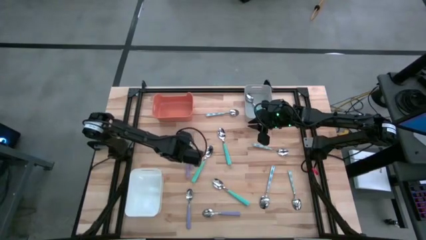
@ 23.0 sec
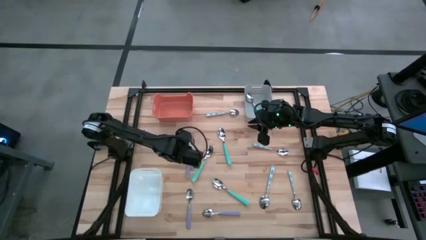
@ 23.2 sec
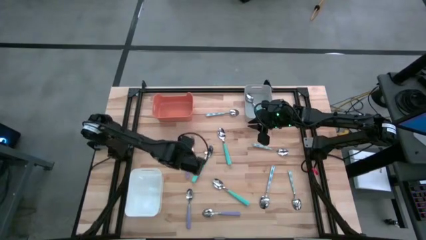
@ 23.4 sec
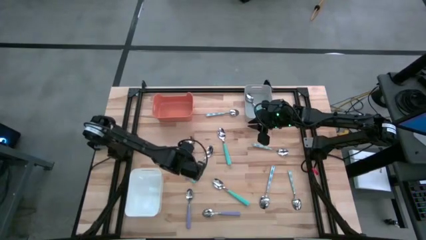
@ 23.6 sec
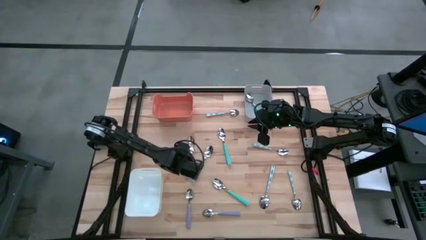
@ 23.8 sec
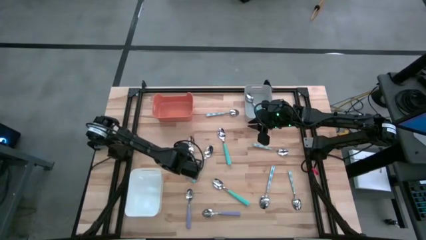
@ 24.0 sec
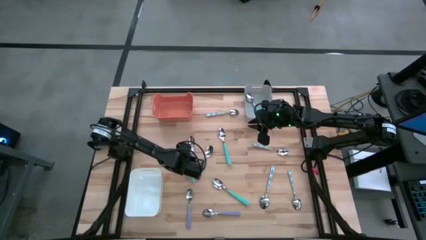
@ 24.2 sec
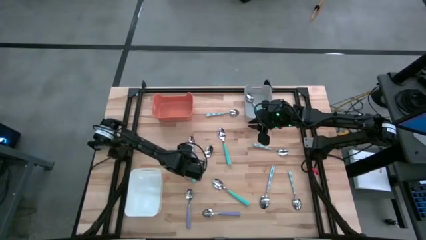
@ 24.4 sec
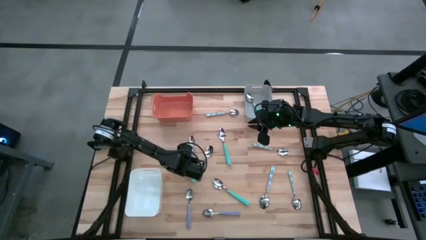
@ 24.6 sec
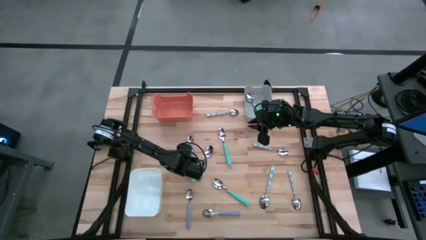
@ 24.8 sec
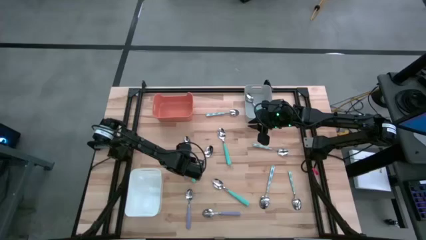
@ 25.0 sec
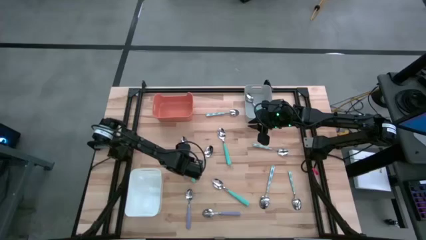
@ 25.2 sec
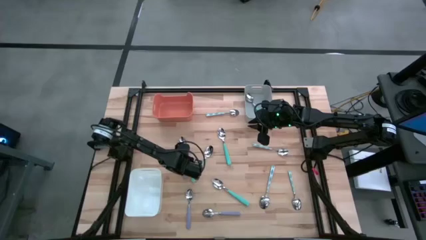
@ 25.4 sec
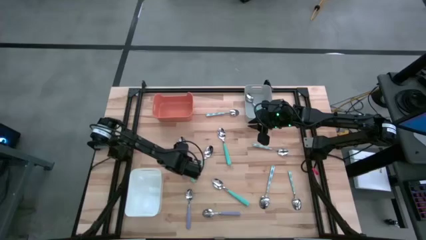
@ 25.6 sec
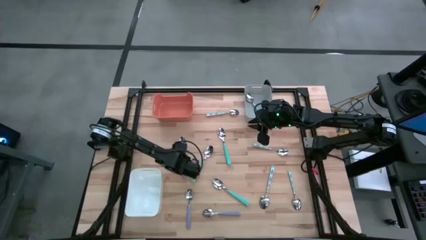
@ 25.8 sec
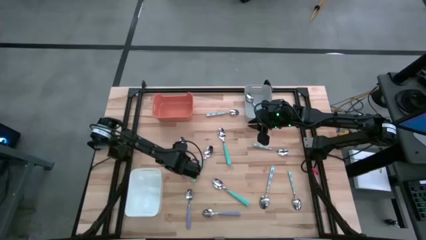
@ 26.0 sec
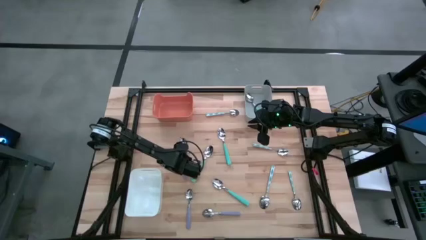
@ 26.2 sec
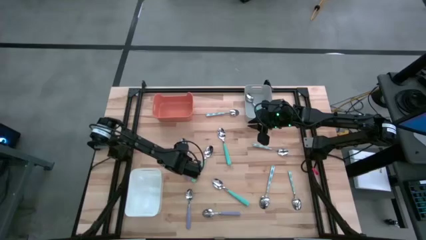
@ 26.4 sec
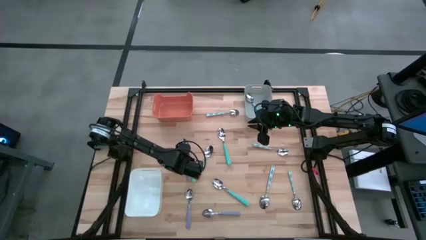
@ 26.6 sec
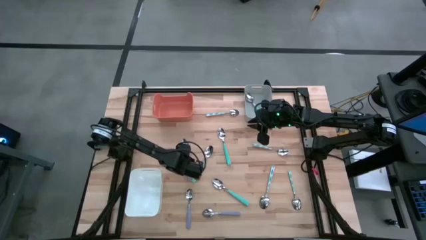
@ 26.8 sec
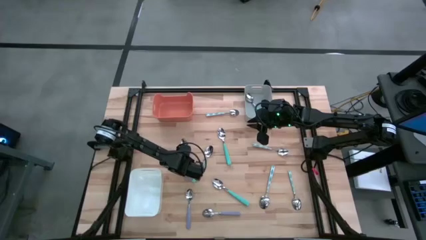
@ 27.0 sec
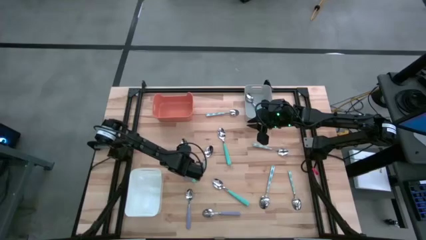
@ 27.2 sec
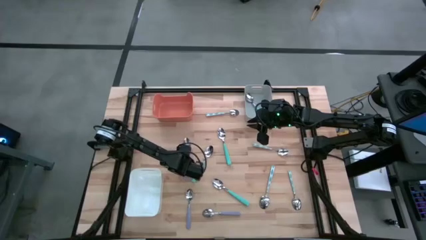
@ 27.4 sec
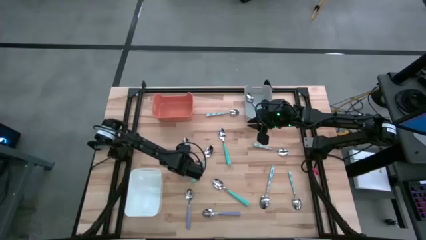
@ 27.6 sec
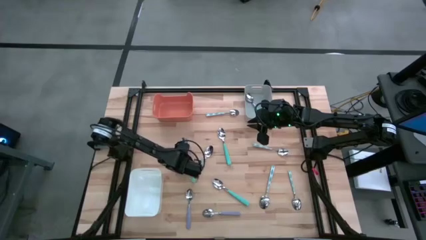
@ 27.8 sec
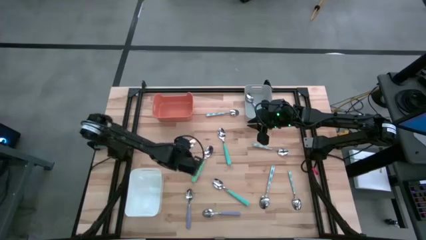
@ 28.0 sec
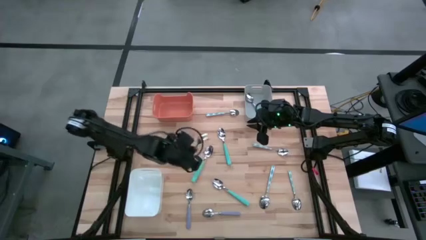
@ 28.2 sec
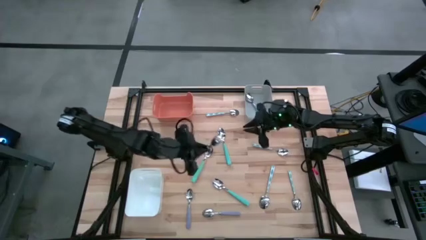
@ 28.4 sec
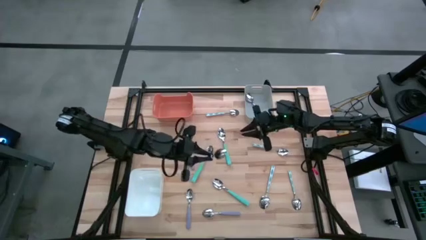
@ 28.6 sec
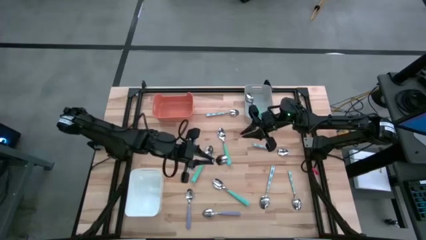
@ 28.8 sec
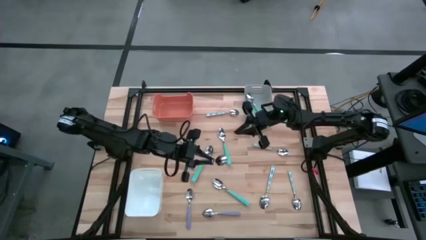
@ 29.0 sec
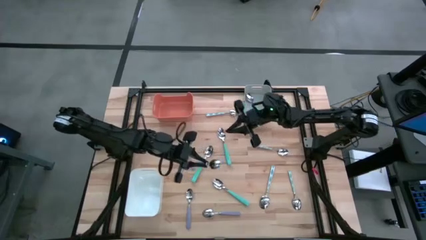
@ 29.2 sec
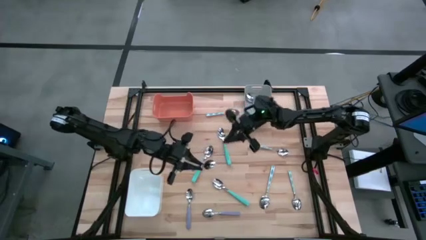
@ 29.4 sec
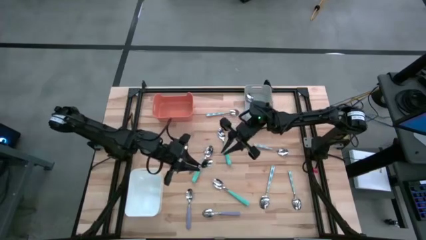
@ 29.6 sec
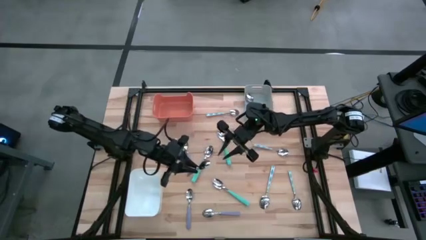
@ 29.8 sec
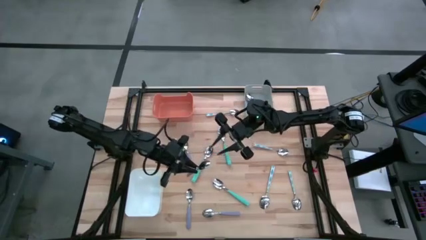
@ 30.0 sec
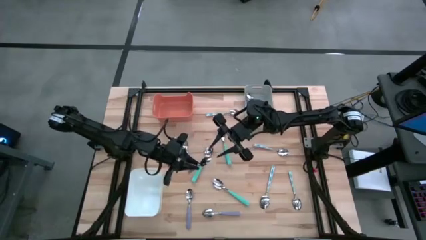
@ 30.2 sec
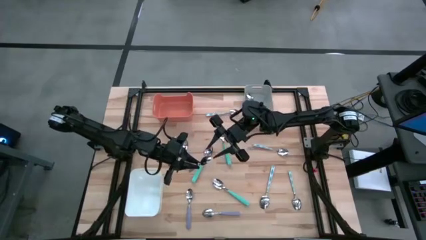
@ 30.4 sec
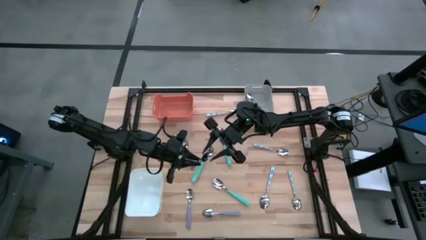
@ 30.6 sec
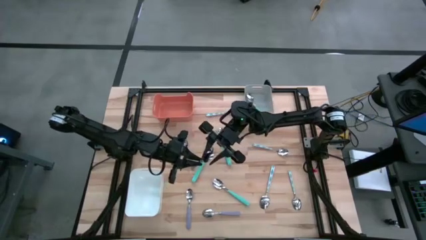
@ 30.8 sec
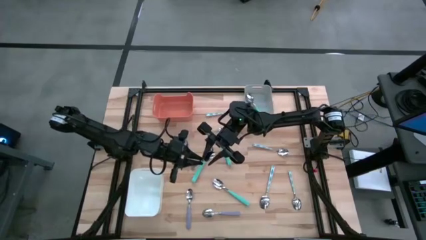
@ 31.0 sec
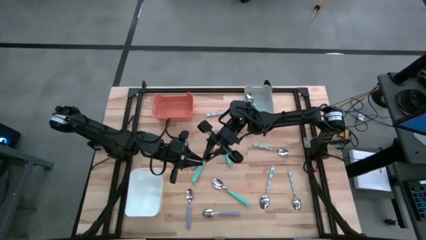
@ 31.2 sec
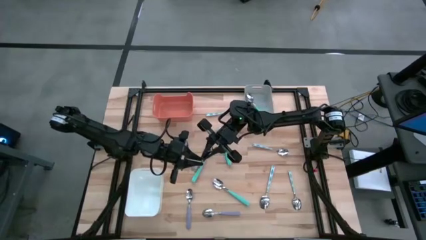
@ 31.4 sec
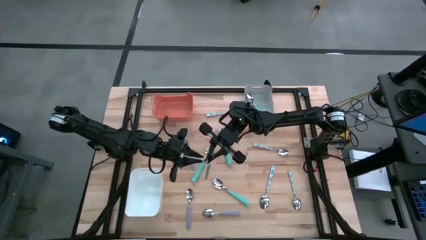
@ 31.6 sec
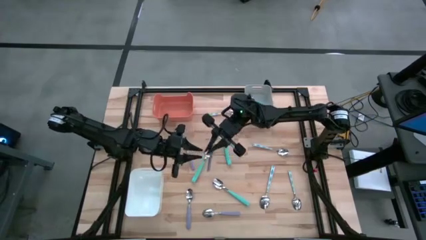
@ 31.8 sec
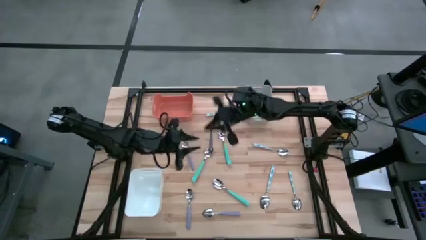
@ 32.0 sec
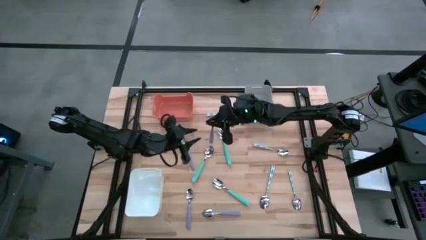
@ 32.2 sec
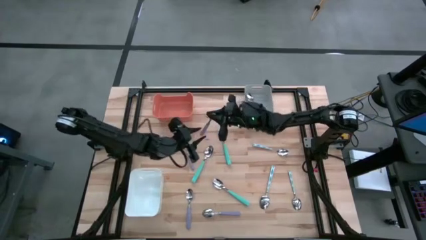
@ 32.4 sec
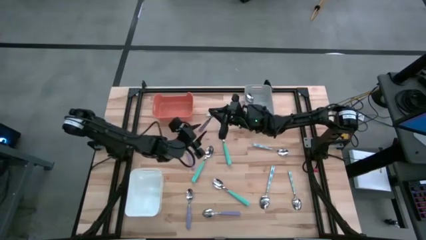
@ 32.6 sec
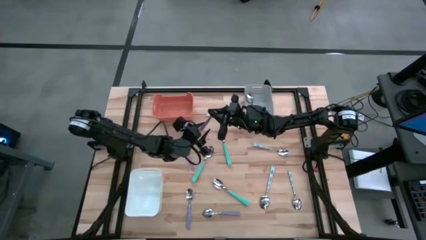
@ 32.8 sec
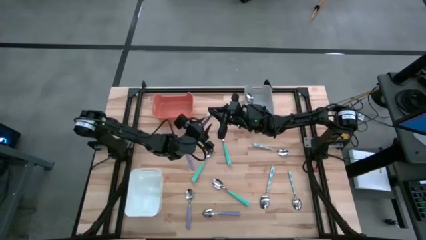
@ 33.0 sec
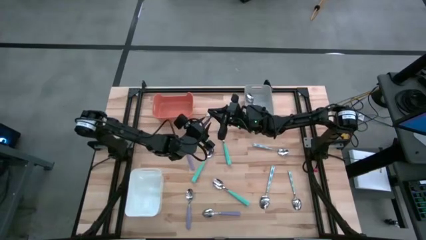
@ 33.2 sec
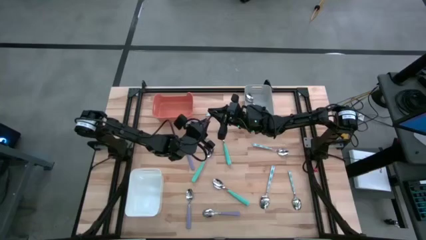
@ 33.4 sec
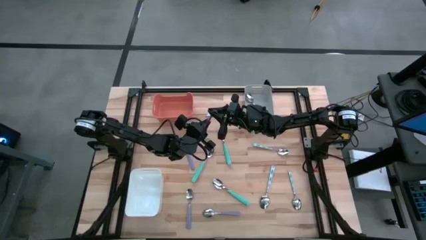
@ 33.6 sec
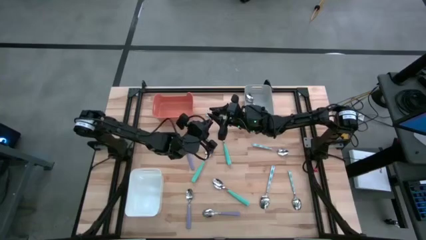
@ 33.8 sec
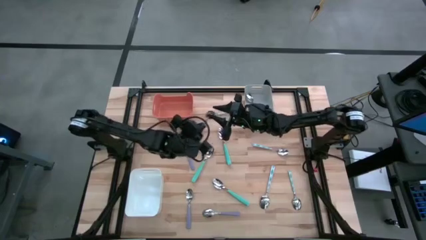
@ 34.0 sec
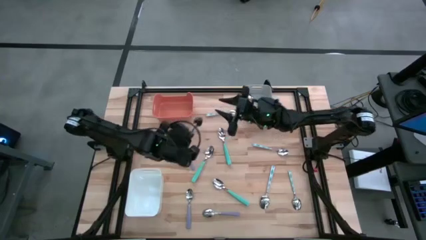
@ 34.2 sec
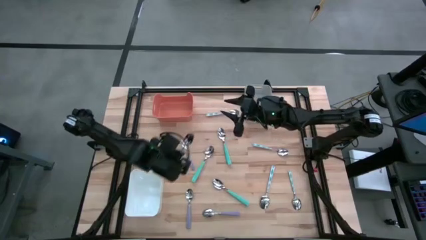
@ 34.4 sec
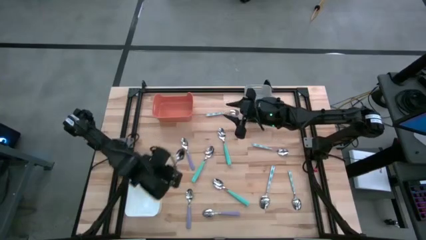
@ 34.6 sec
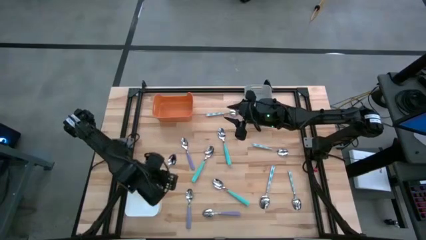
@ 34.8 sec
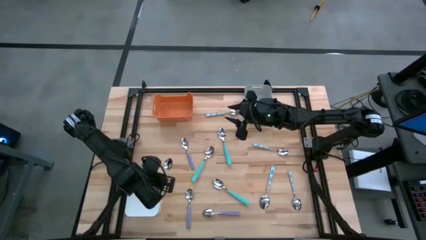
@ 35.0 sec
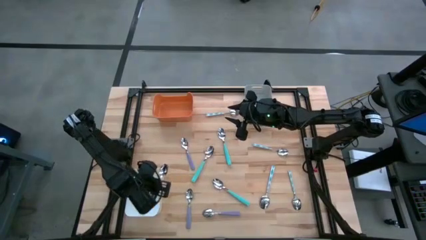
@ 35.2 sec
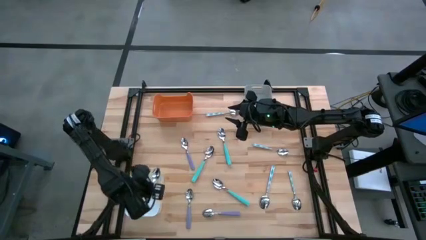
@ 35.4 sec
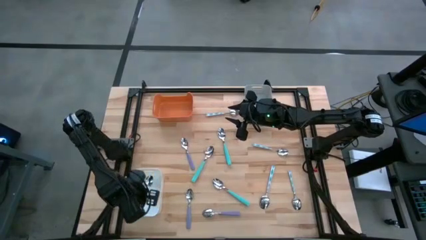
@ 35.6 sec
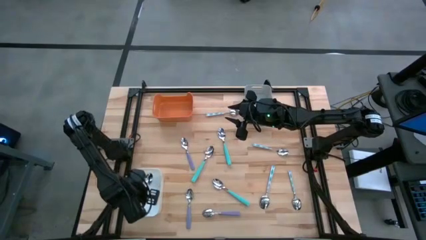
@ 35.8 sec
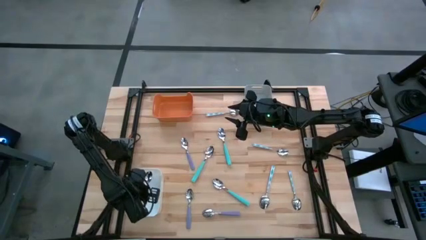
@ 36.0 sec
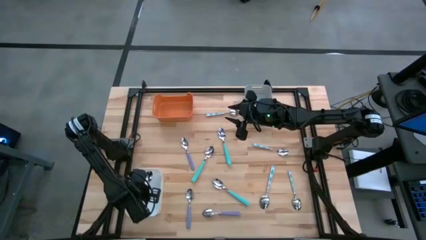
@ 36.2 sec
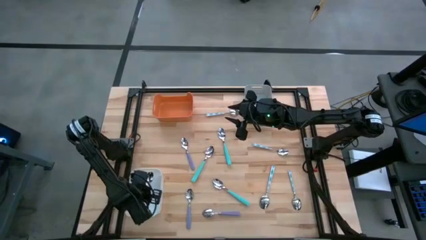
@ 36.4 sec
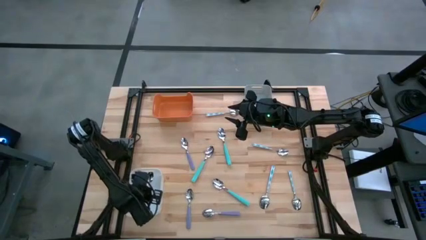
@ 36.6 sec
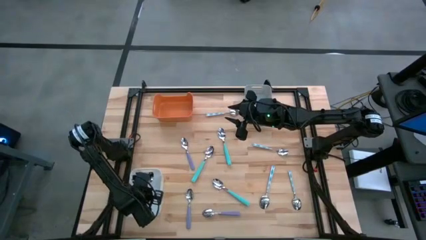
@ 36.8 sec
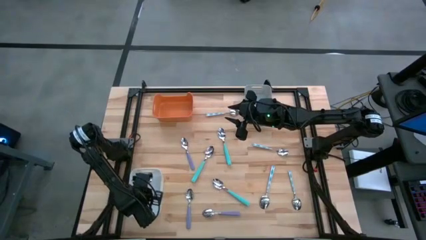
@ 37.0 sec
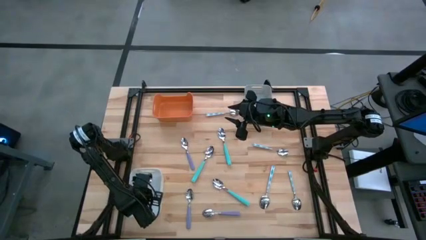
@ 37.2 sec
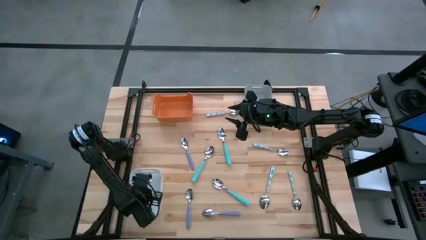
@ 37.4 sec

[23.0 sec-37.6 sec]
Task: Sort silverware by color (type)
Put the purple spoon into the white bin
